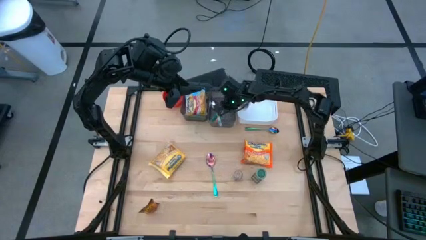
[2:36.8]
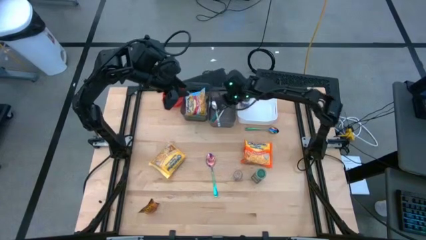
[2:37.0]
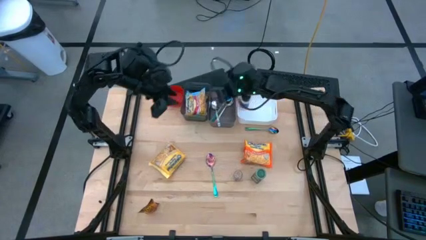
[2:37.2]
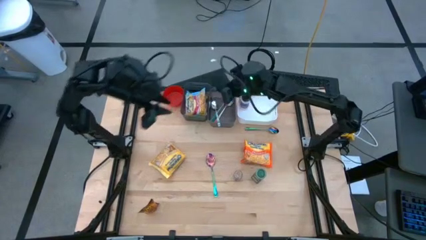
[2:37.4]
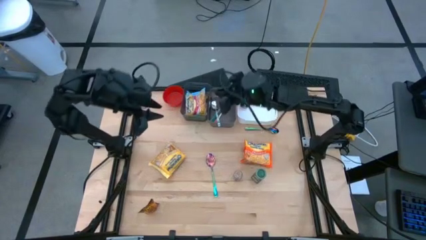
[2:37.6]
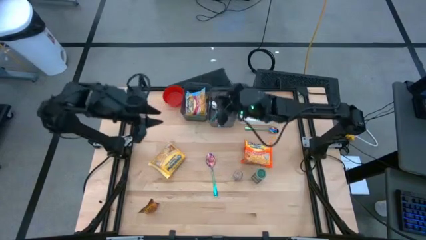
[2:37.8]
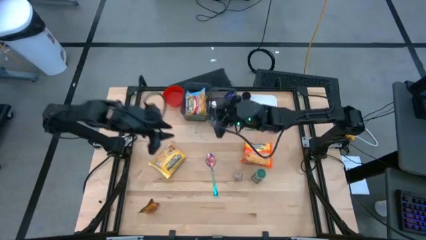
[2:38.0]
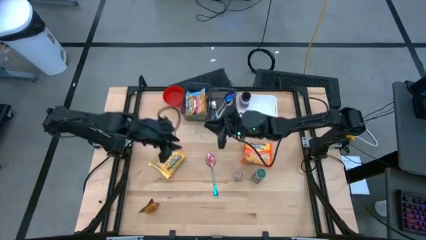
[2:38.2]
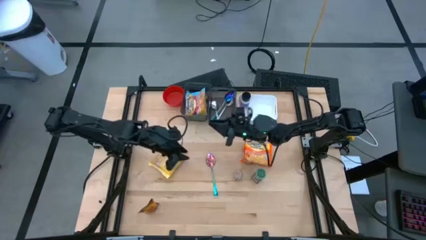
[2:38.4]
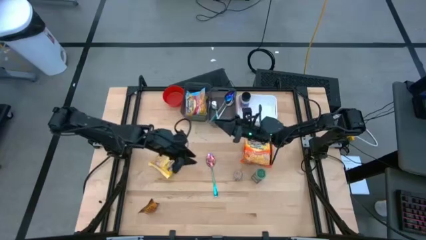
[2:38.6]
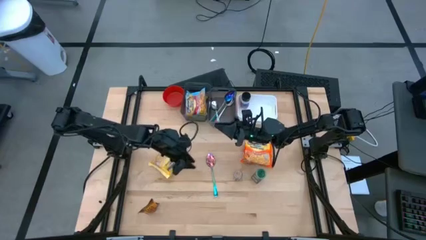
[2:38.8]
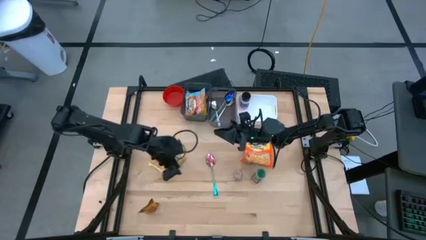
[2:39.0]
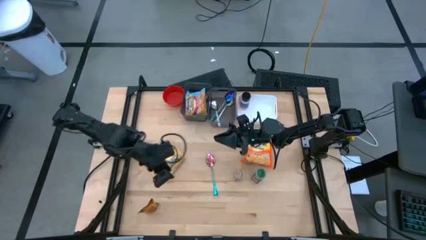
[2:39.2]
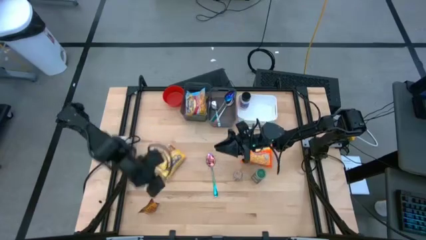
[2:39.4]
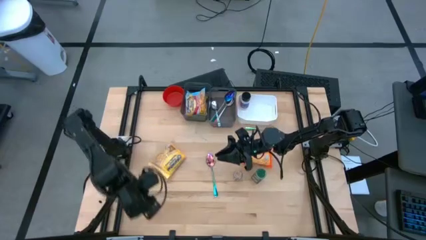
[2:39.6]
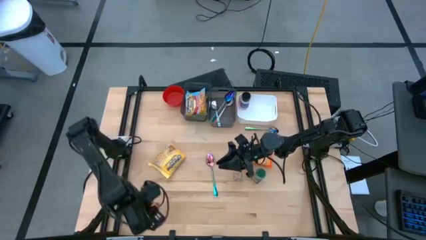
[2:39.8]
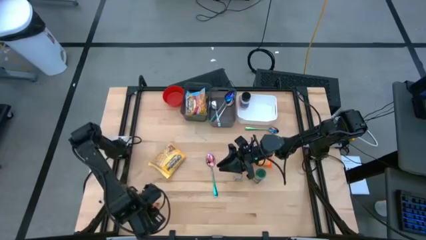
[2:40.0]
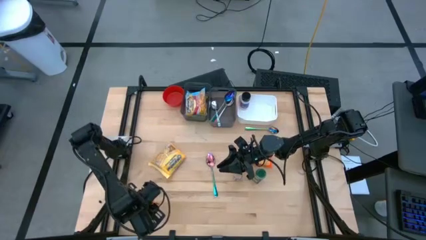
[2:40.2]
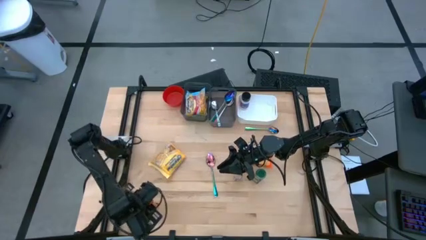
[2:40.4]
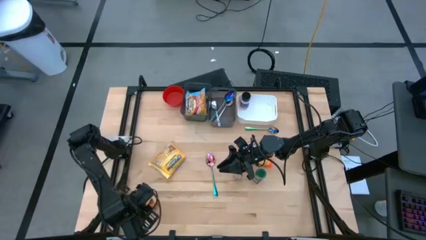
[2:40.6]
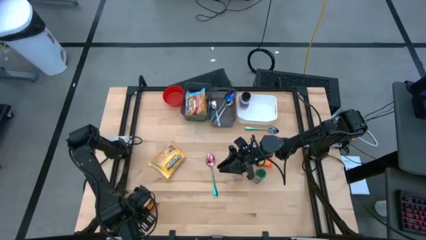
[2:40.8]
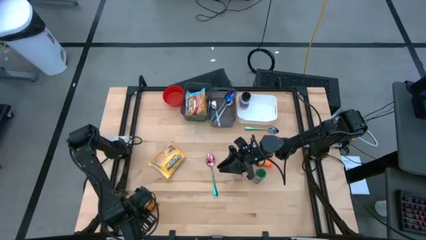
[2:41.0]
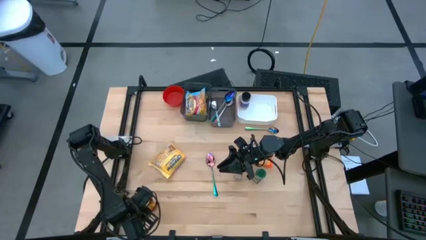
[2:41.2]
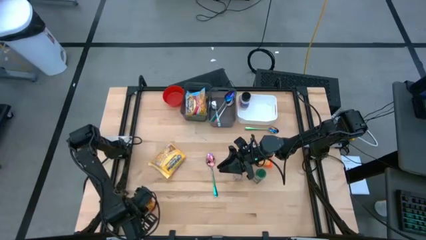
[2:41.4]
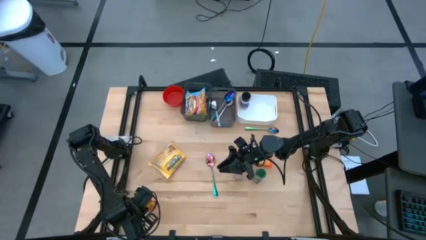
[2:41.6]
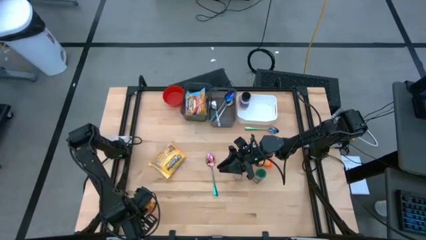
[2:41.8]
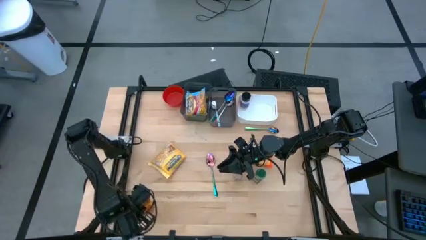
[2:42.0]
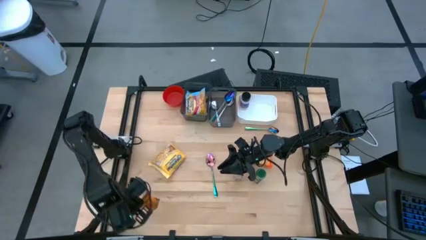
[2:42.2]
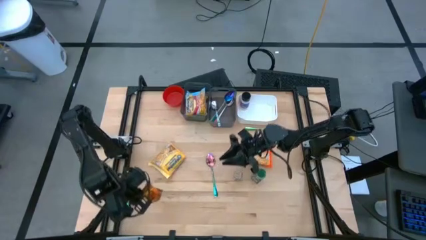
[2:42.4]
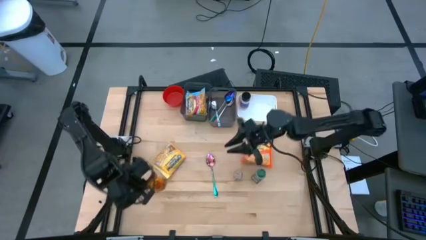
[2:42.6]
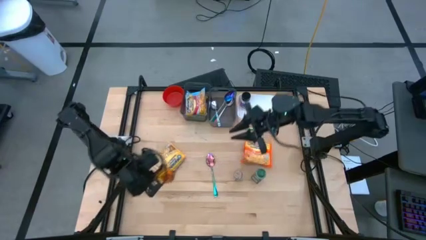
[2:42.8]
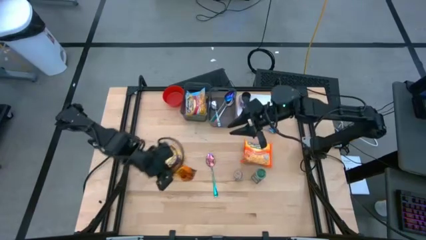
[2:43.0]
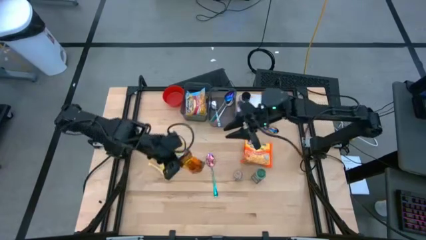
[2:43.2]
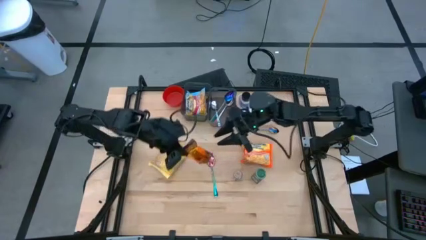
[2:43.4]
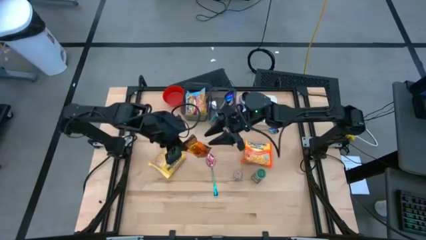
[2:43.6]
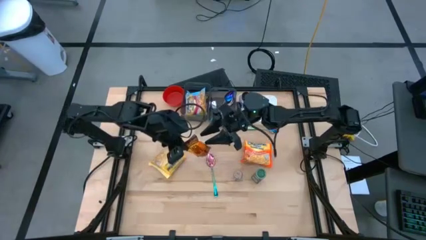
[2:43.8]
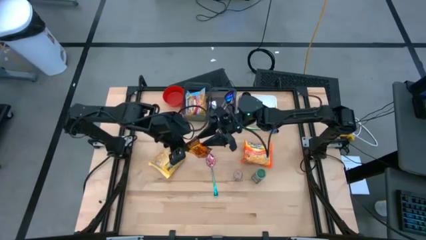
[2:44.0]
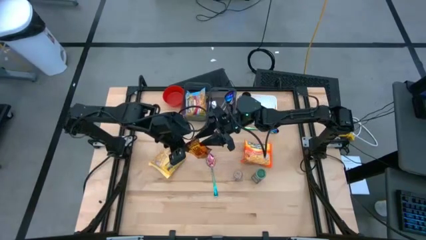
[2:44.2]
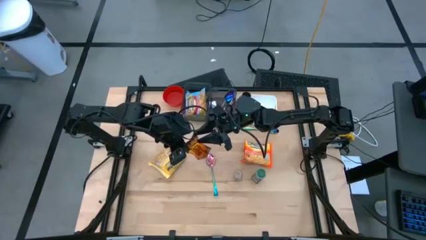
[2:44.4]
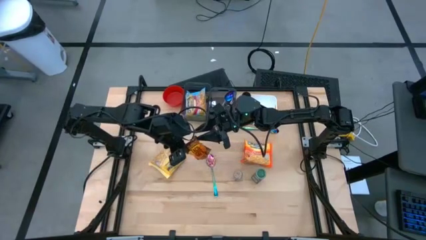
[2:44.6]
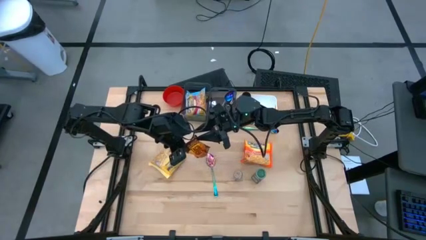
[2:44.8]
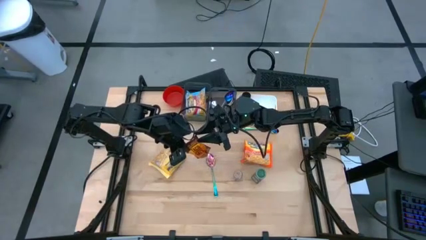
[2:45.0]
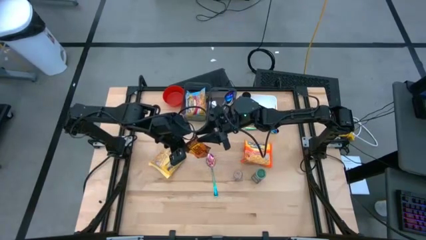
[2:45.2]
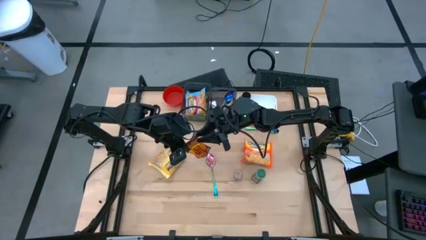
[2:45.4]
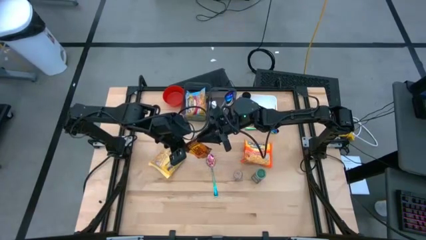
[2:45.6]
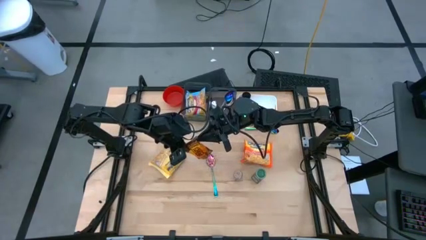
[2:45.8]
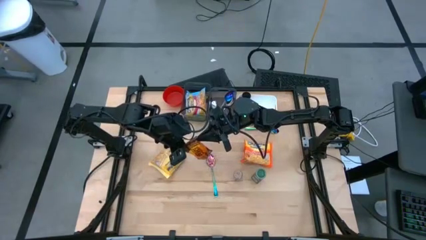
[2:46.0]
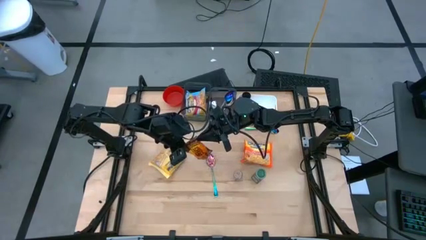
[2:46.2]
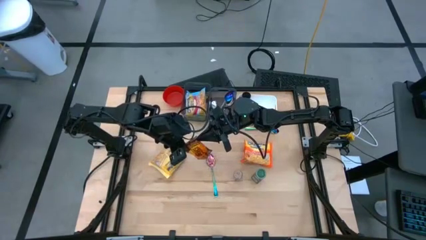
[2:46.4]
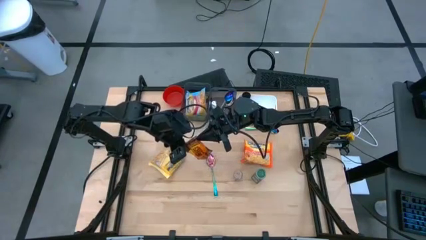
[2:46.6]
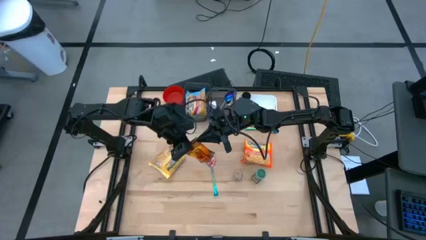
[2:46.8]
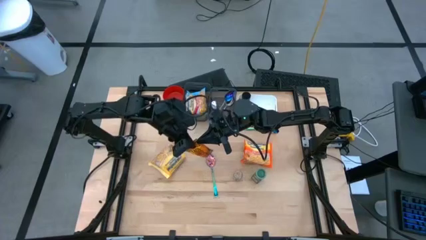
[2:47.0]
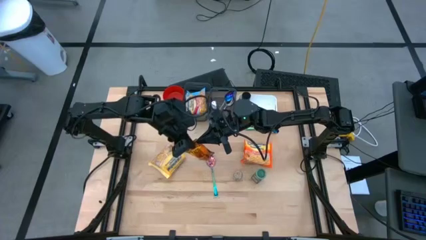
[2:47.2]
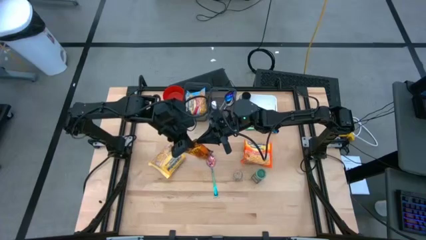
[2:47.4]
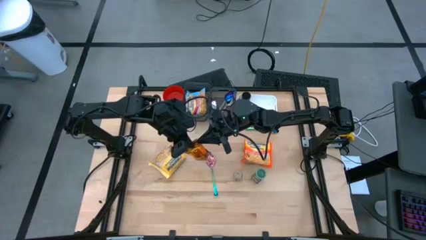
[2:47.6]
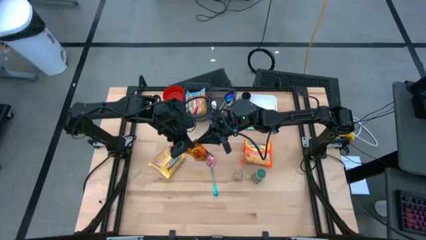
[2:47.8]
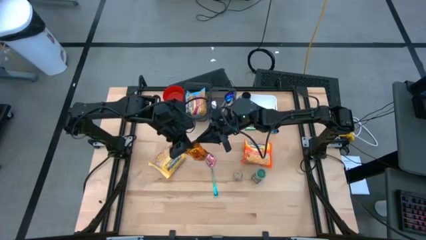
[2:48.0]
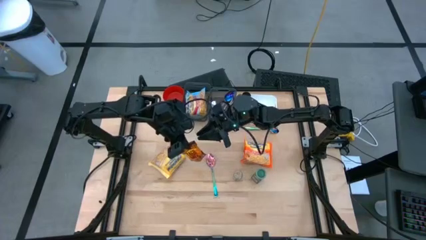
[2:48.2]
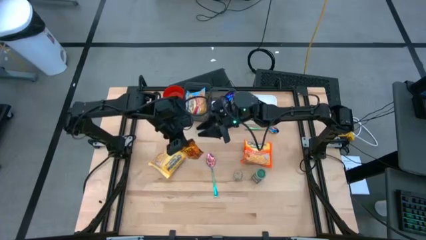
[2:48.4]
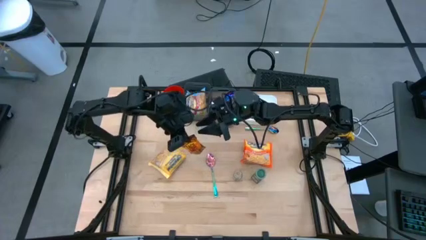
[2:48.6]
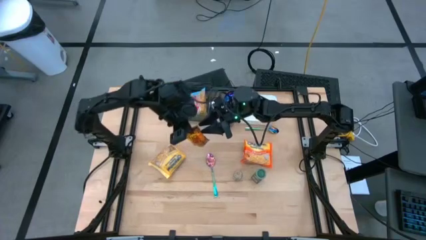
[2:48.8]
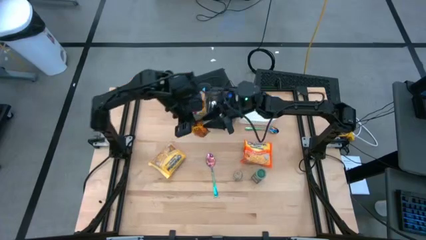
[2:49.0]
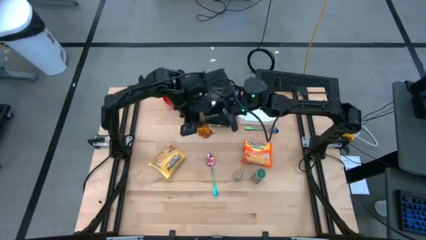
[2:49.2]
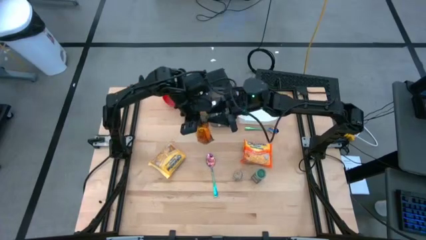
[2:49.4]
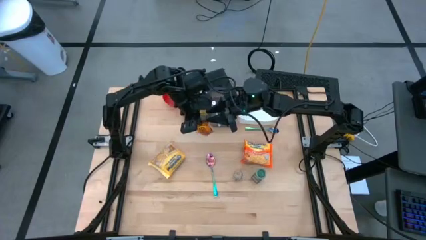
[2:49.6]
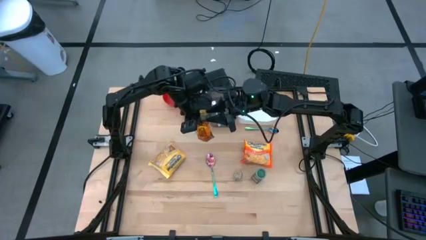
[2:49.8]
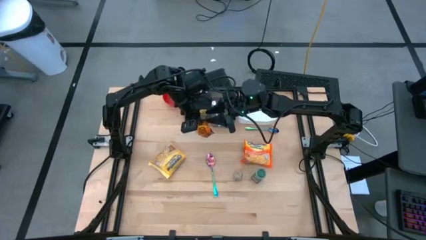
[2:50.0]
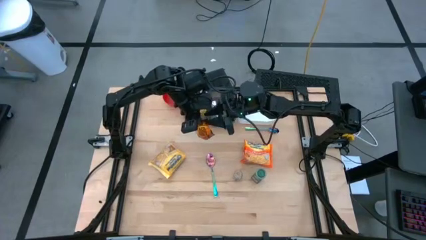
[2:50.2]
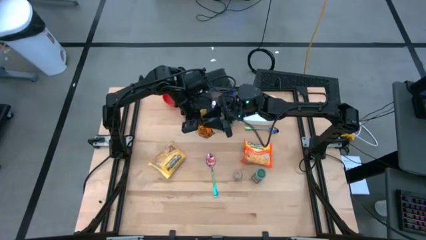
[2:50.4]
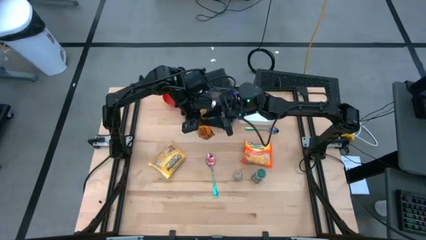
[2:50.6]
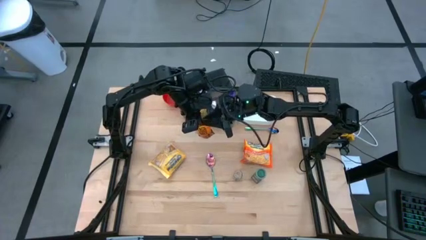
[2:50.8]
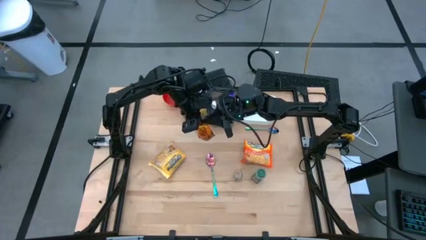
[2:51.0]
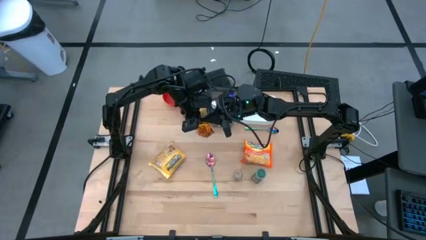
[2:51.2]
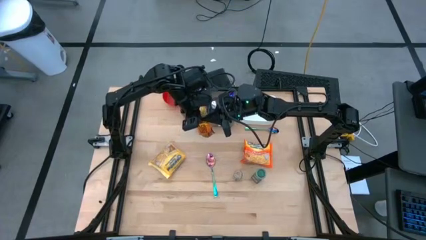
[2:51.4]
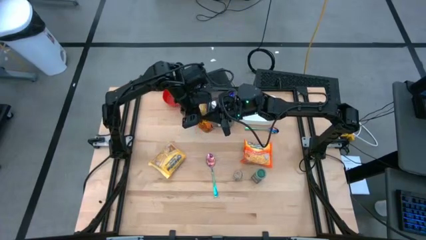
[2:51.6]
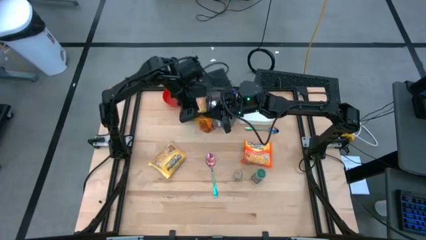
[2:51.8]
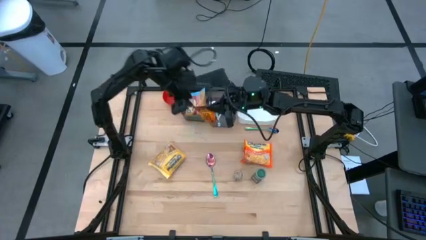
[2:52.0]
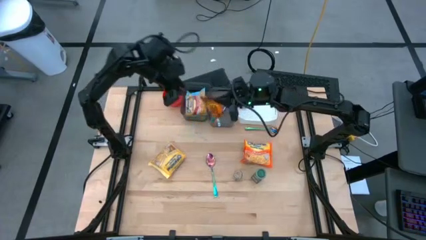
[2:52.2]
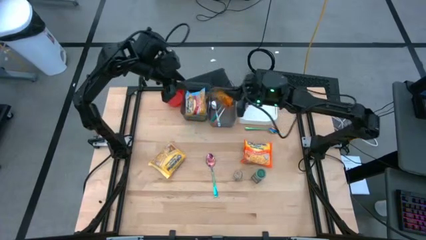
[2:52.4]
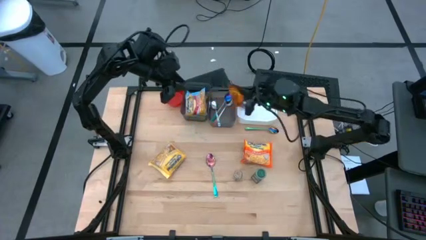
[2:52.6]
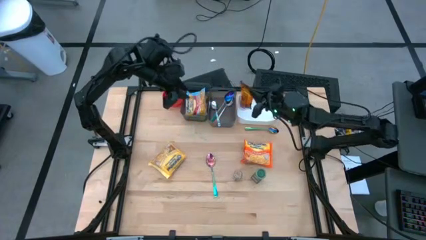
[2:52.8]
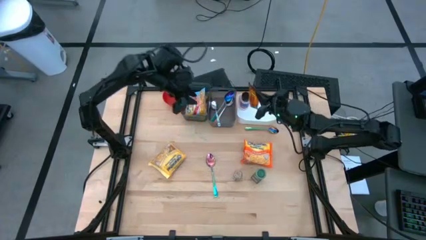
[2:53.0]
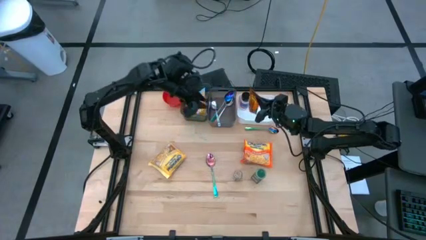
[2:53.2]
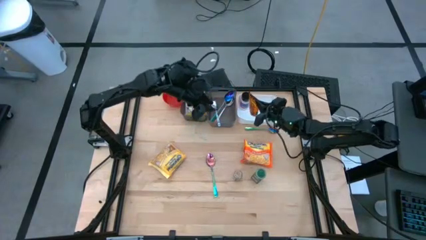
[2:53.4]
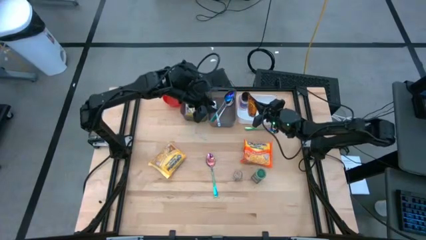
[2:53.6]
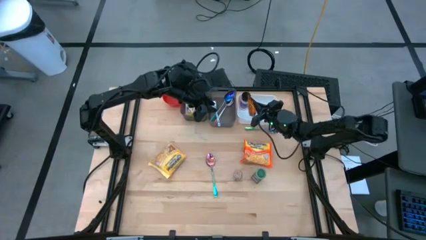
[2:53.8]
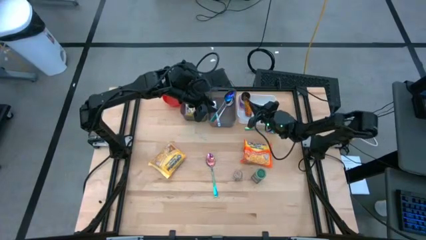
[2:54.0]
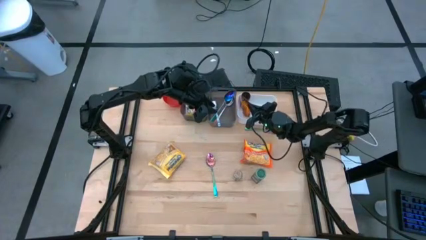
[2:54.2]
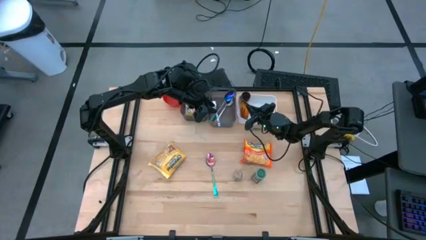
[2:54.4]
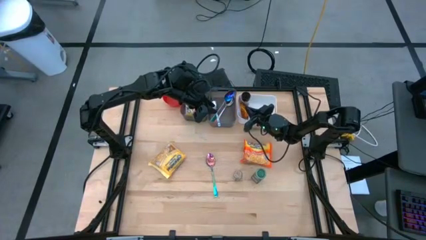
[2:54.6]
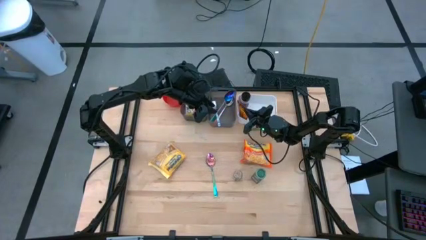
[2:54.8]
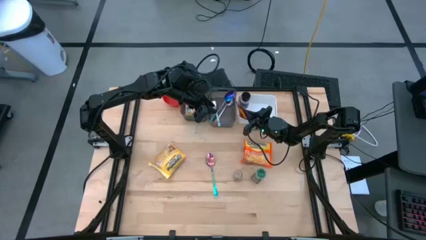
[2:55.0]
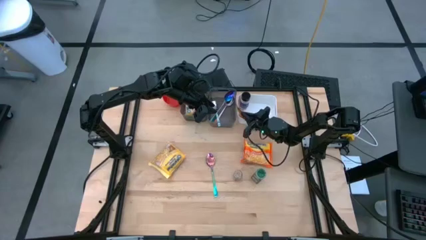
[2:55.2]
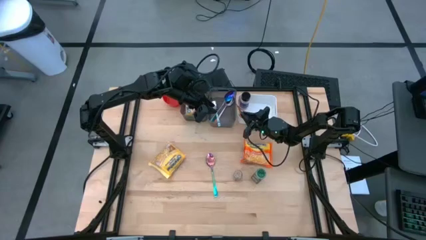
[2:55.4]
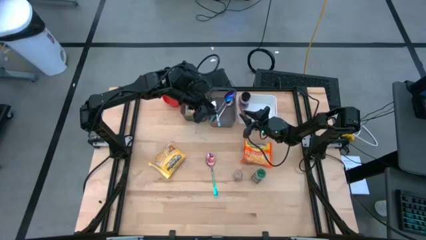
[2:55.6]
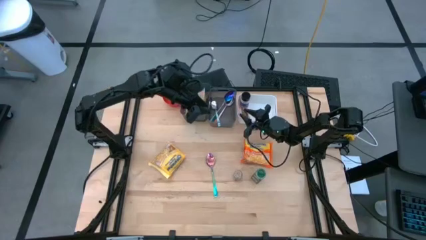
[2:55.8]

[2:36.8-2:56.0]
Task: Pick & Place Food Item
Put the orange seasoning bag into the white bin
